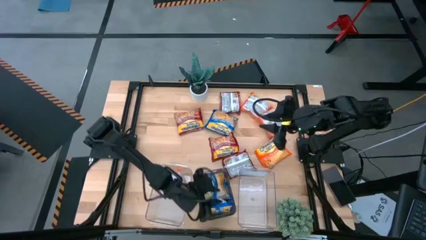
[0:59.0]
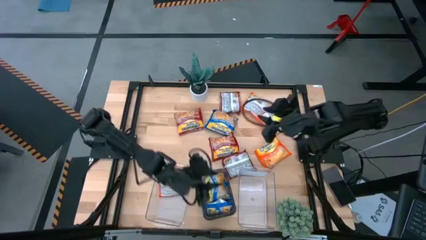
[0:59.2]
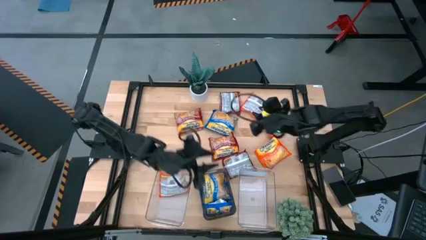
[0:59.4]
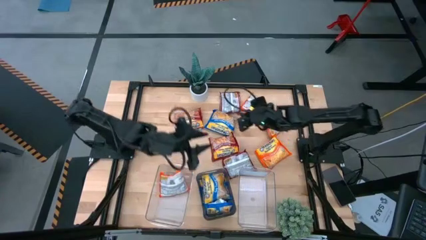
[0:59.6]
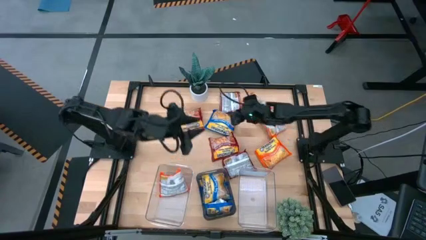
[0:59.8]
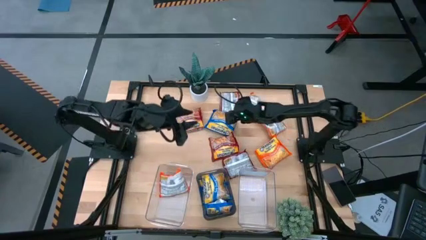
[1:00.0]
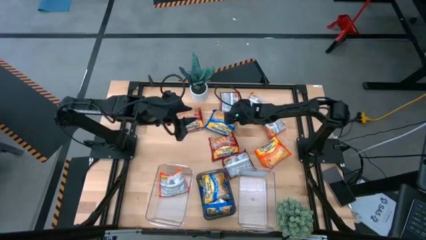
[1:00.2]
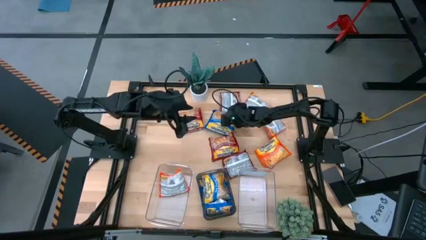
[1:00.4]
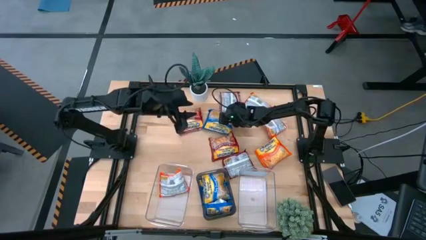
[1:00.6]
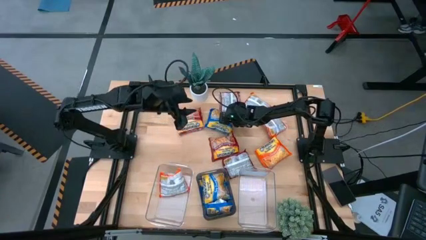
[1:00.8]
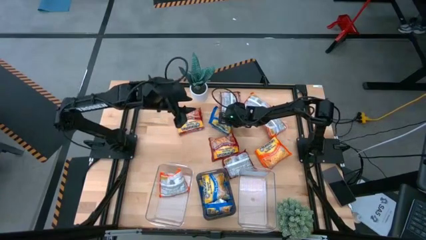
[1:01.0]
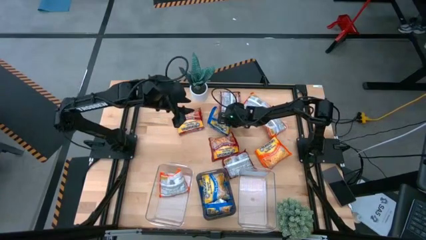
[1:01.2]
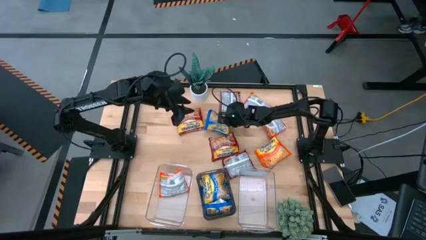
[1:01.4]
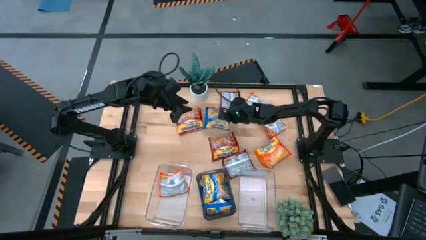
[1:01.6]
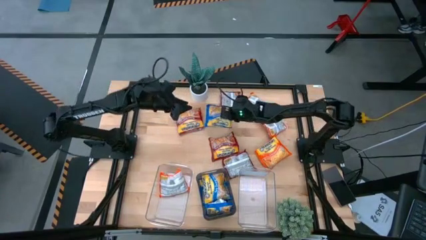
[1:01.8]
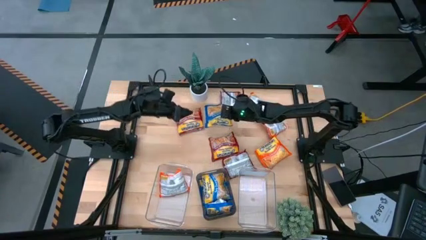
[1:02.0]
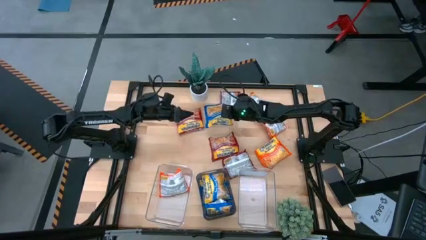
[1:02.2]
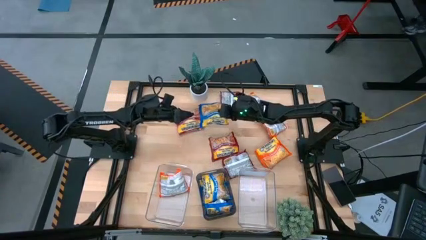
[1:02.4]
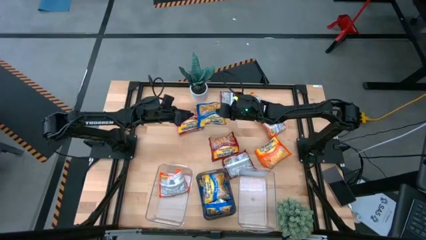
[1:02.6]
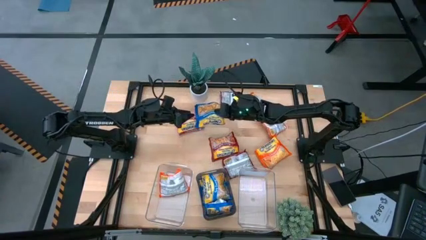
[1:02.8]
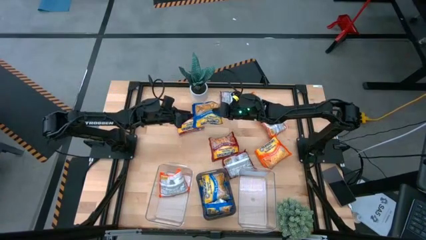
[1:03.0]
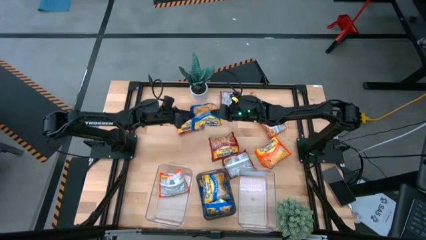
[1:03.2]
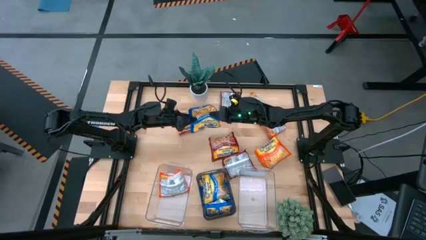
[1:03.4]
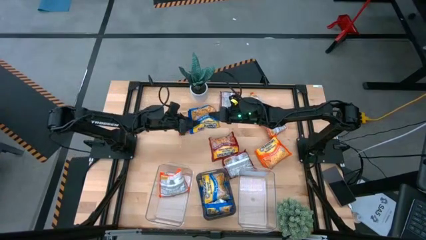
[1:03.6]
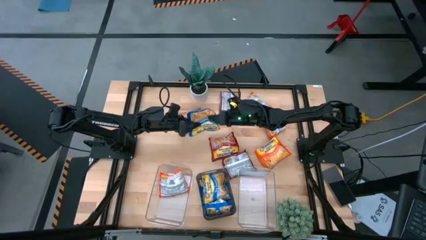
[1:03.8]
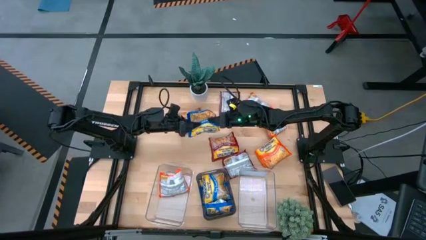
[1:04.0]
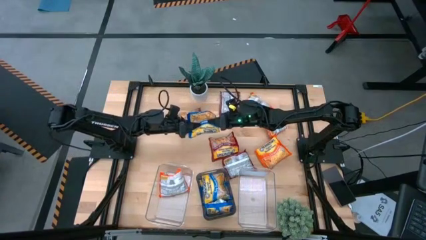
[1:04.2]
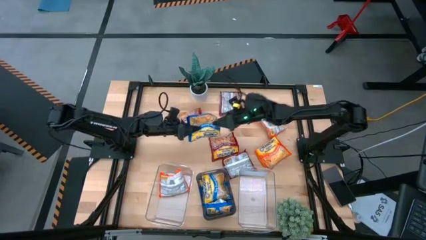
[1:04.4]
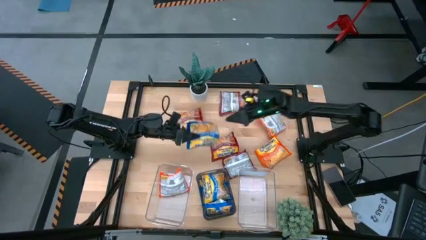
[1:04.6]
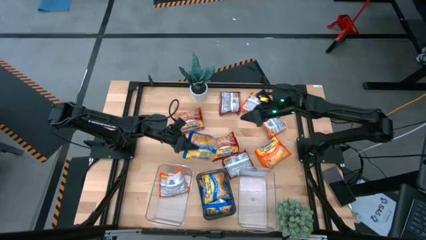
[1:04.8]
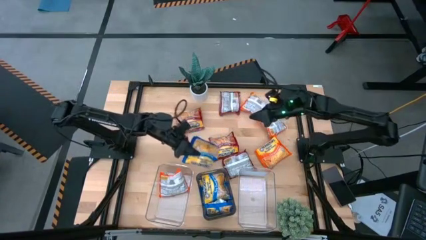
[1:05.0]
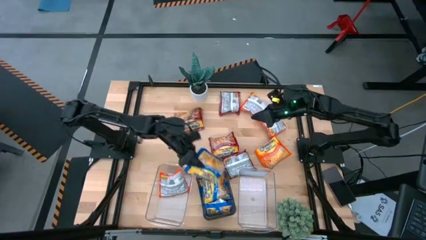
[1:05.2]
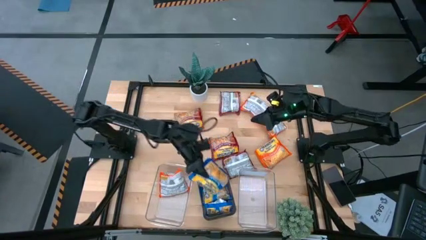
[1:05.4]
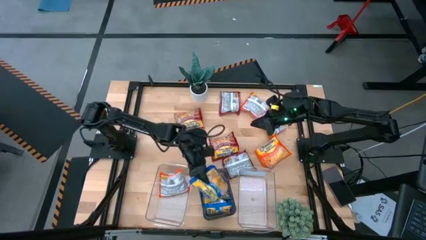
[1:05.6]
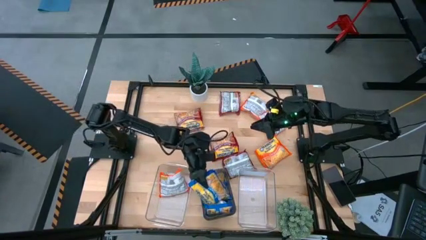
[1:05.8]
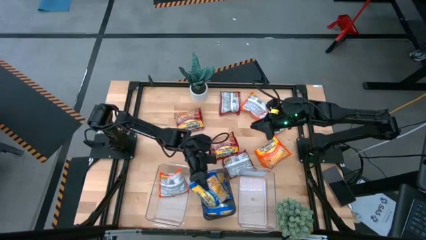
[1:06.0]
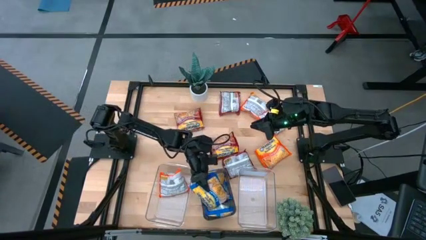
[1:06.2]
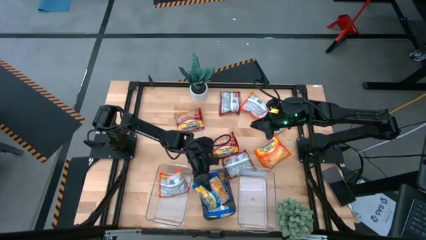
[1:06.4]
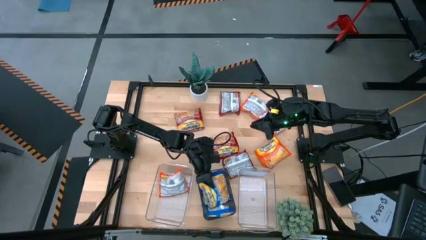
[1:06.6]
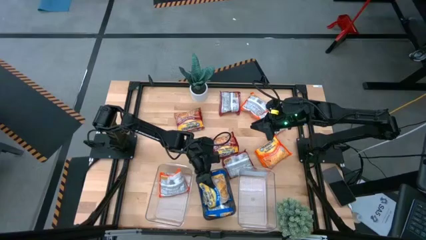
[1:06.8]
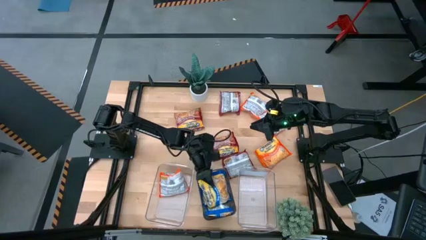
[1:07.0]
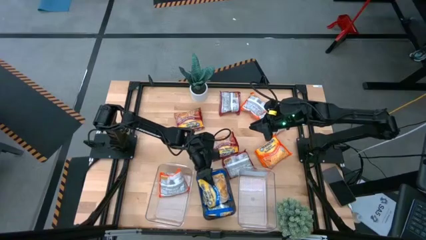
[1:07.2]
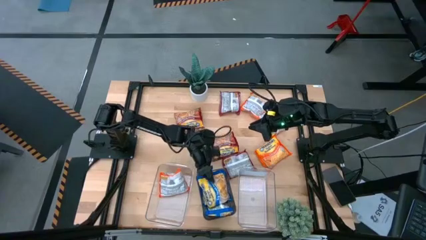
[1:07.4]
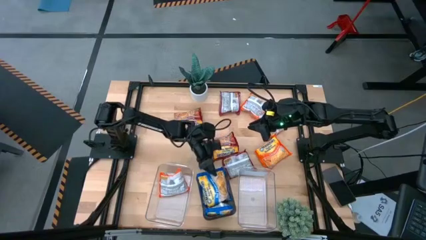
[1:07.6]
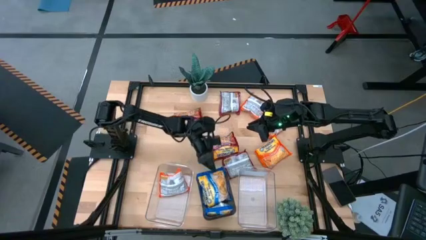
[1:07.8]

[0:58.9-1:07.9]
Task: Sort Maruchan noodles
Put the blue noodle pack into the black bin

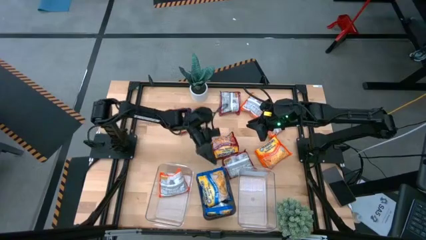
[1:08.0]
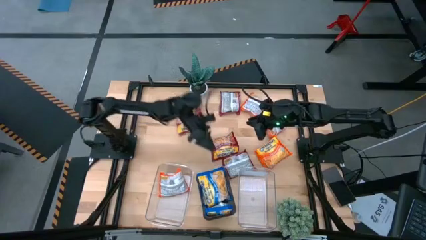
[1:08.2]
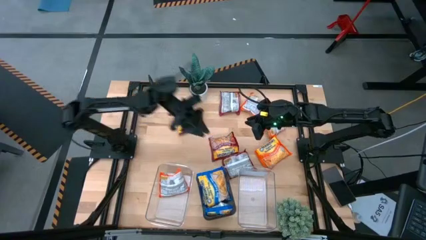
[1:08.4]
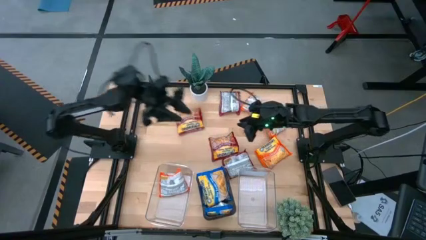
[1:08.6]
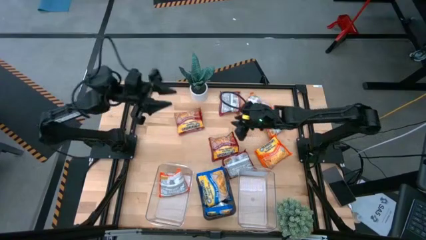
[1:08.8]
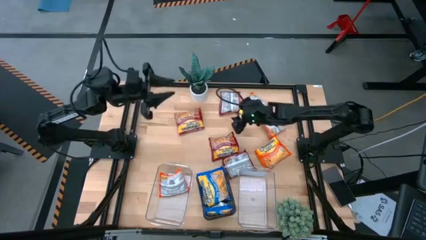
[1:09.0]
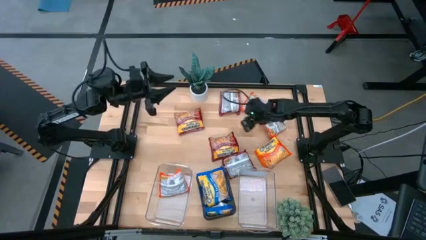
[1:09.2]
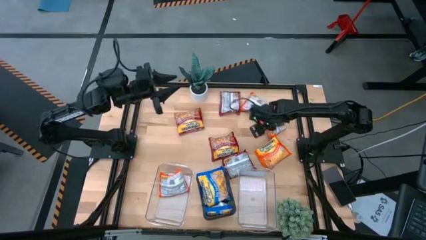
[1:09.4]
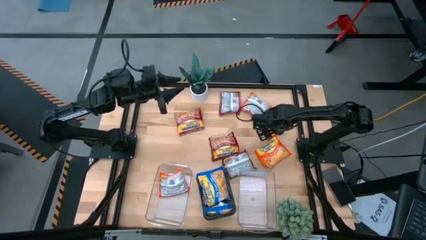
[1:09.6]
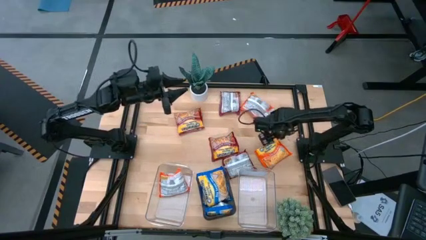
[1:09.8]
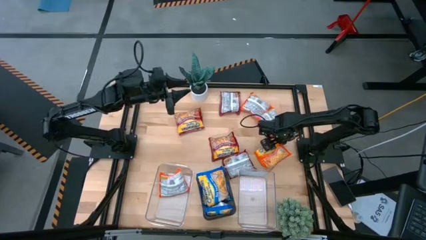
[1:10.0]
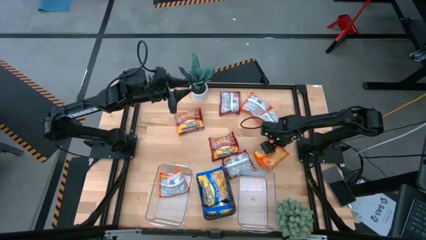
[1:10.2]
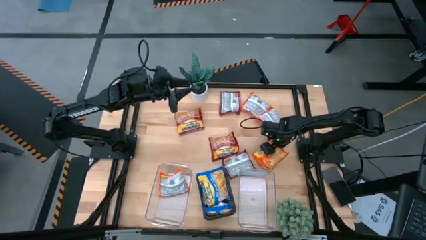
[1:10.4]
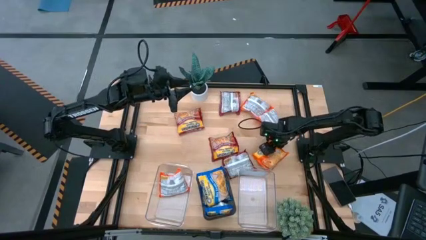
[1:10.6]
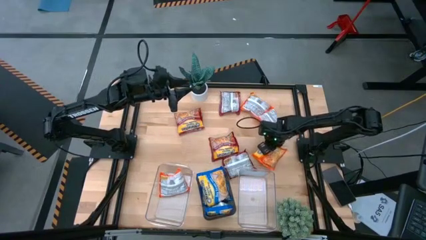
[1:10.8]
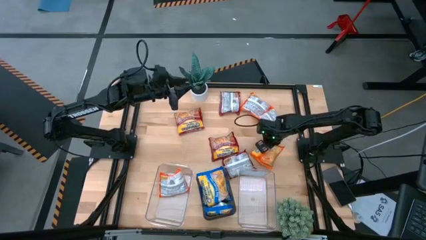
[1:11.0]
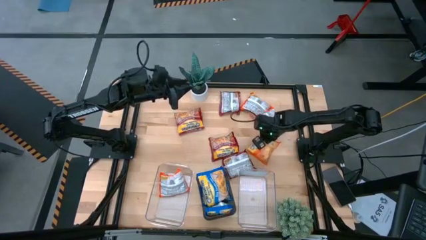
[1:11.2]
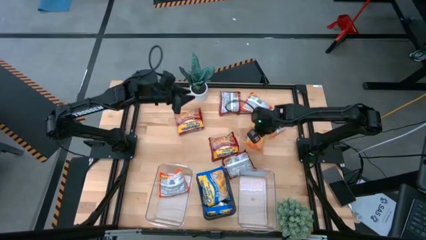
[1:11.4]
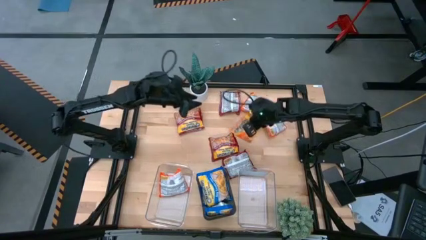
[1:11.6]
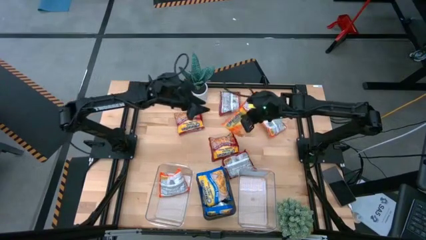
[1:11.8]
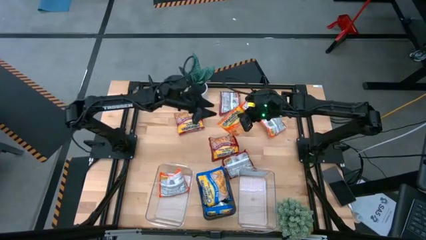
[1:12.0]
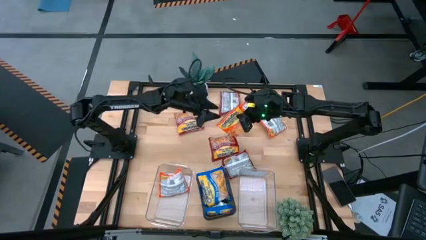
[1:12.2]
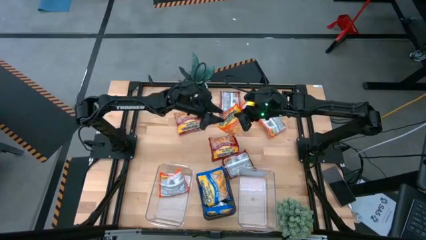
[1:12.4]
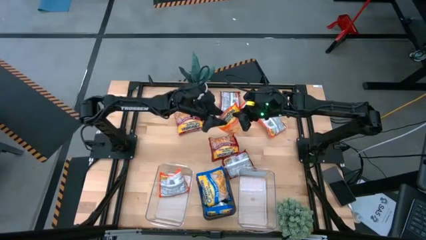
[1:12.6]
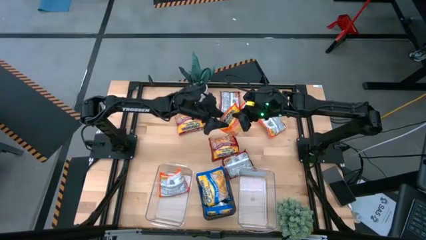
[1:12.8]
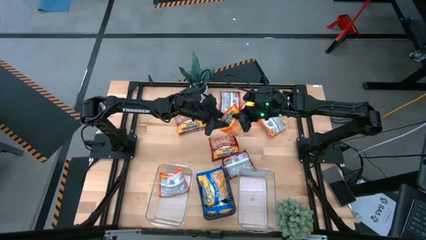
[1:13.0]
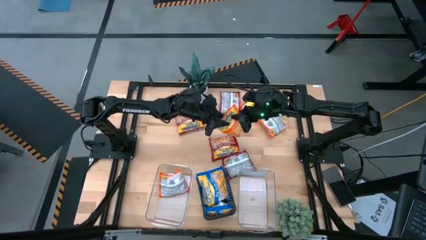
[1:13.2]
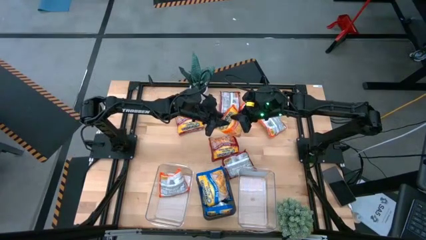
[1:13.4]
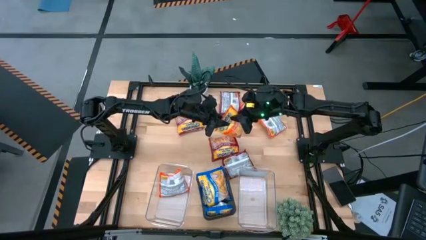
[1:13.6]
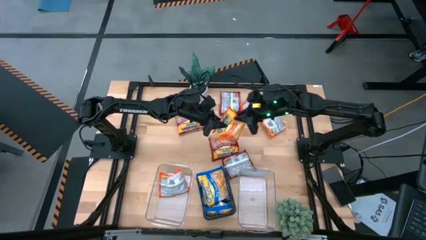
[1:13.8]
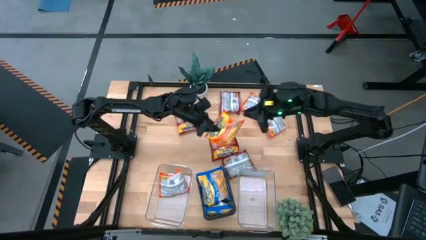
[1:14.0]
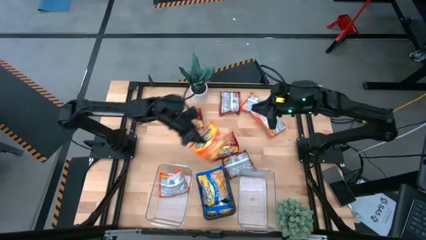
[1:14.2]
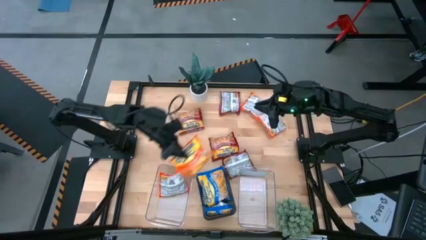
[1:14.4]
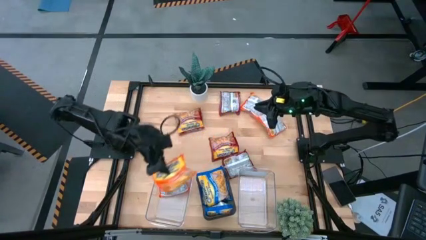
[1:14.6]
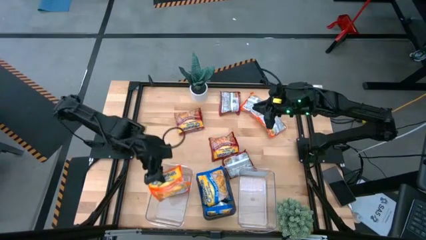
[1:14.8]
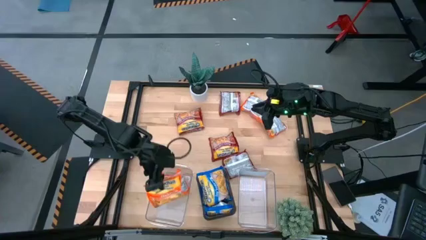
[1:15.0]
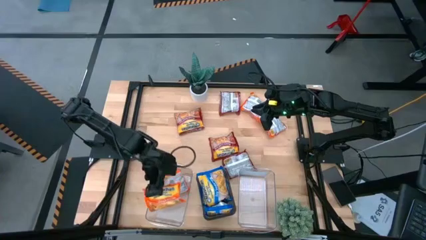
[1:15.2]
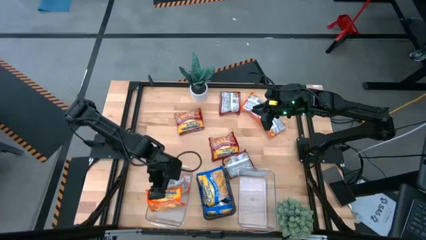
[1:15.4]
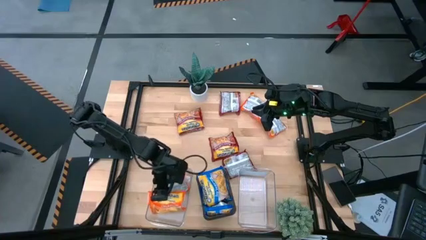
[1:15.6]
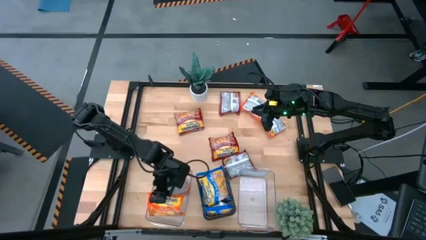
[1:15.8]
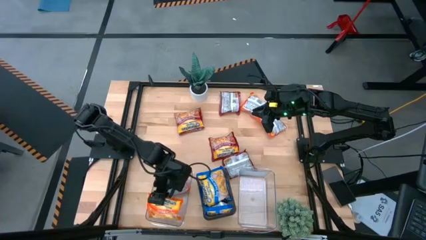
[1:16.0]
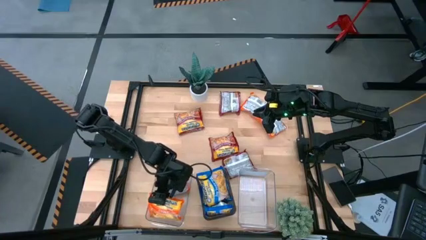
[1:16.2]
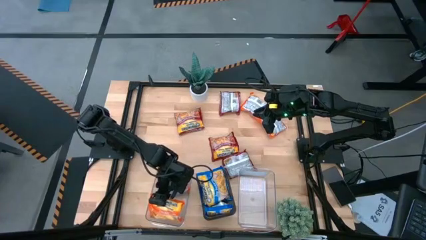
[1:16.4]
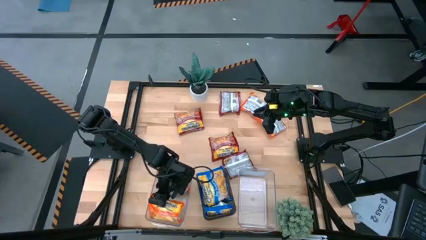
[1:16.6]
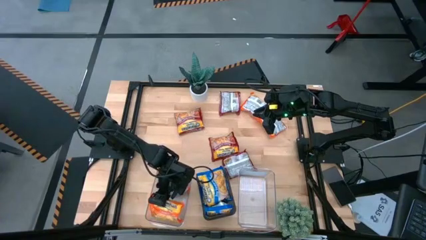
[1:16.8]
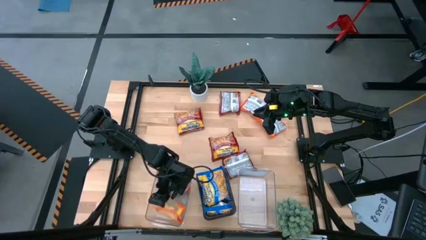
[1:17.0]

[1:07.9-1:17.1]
Put the orange noodle pack into the left transparent bin
